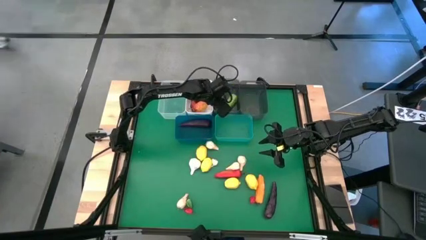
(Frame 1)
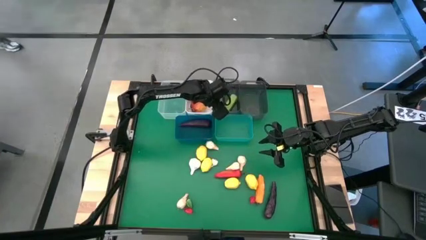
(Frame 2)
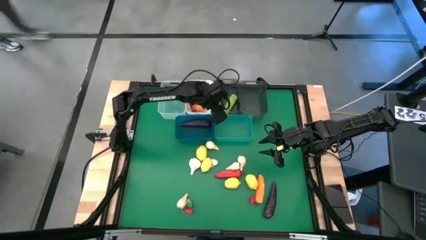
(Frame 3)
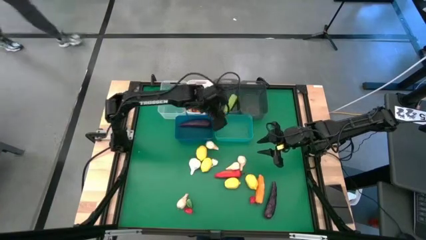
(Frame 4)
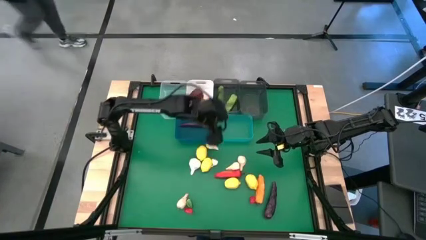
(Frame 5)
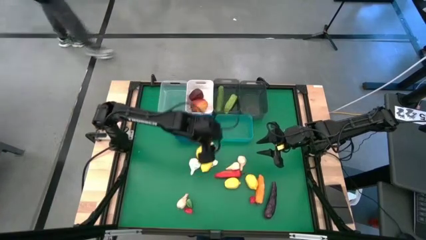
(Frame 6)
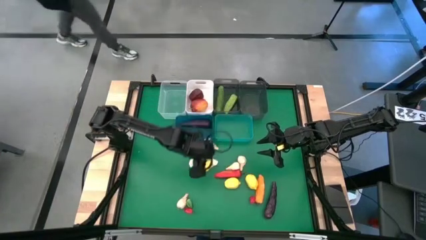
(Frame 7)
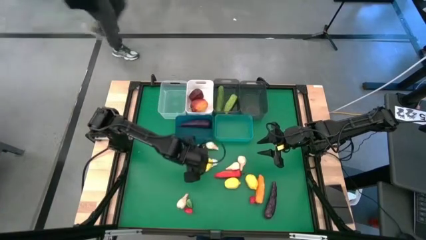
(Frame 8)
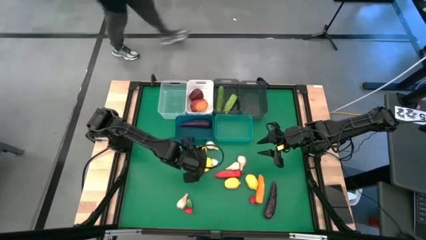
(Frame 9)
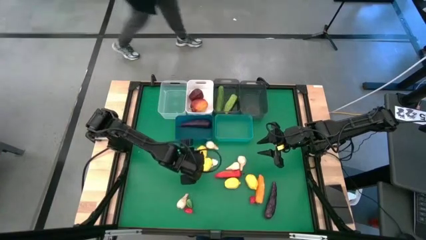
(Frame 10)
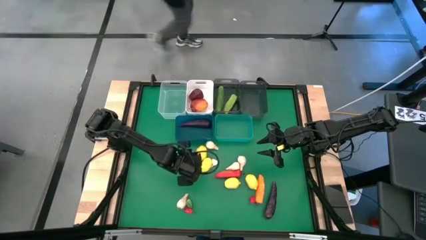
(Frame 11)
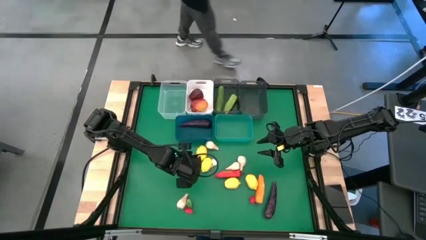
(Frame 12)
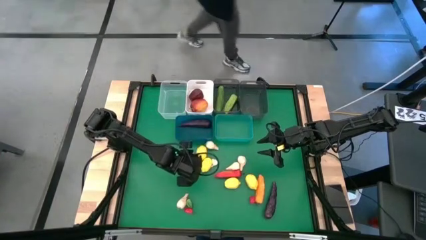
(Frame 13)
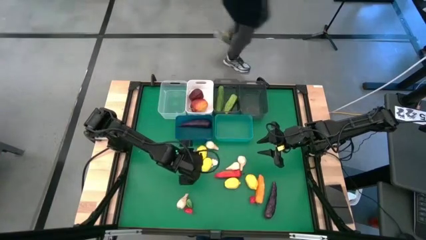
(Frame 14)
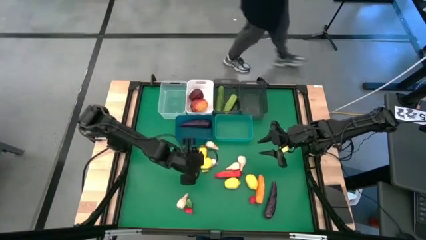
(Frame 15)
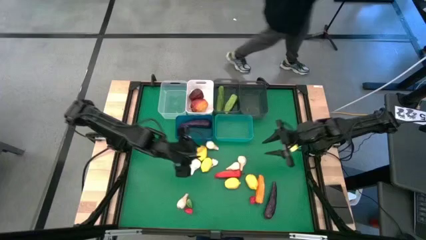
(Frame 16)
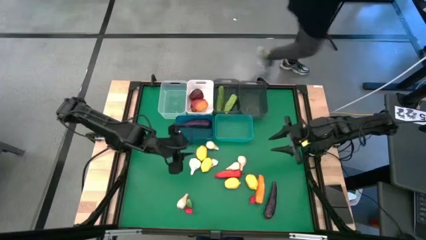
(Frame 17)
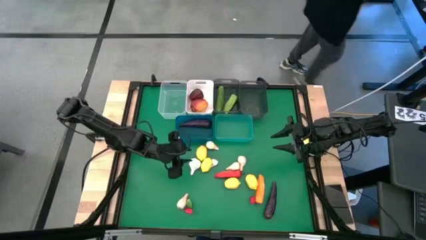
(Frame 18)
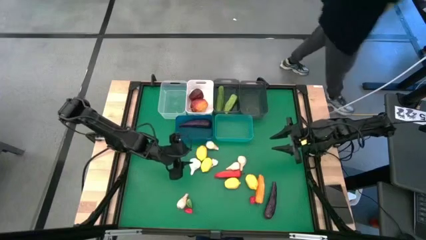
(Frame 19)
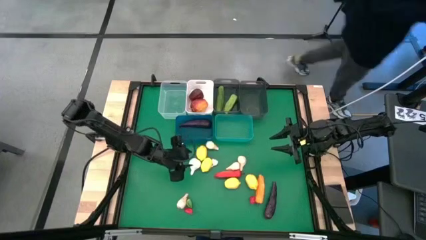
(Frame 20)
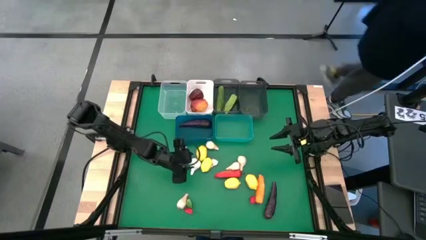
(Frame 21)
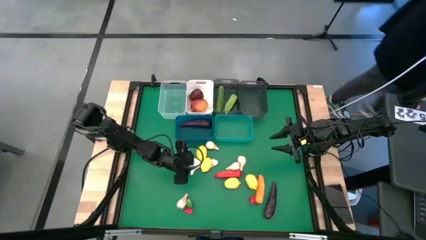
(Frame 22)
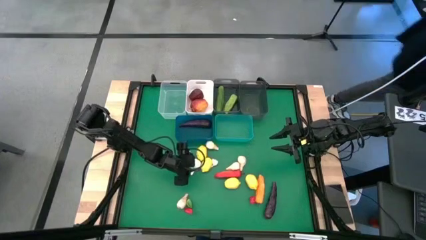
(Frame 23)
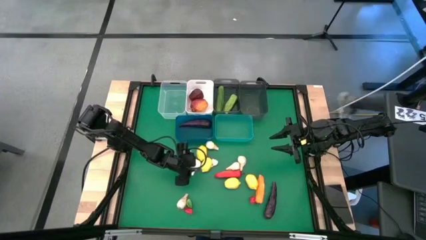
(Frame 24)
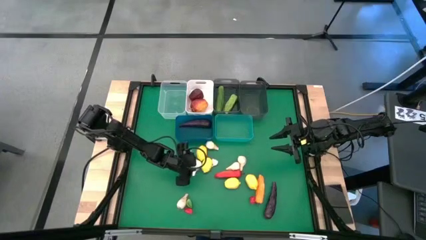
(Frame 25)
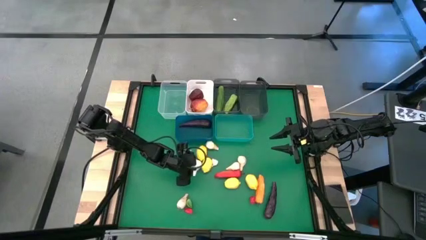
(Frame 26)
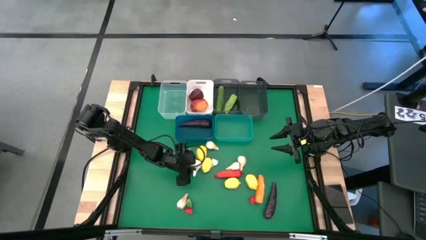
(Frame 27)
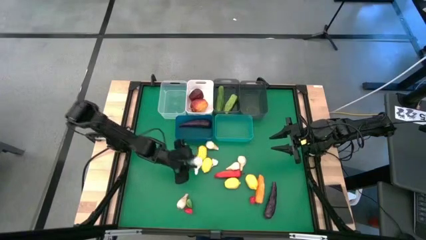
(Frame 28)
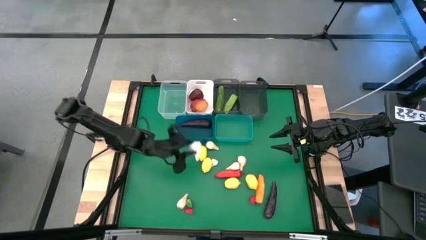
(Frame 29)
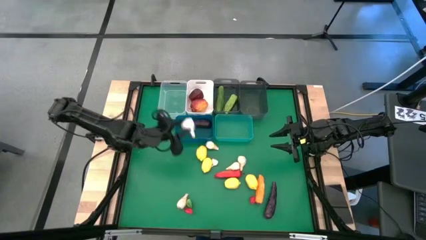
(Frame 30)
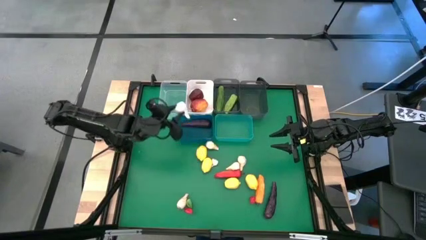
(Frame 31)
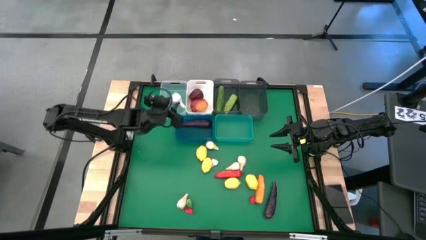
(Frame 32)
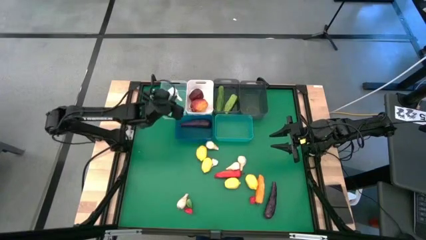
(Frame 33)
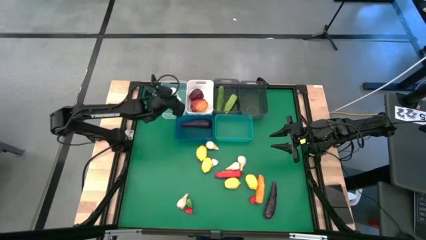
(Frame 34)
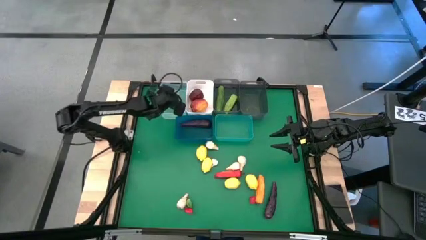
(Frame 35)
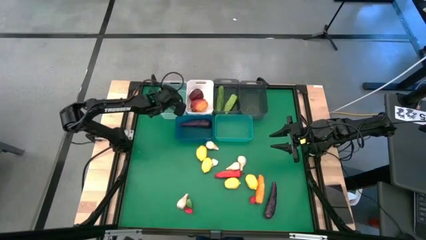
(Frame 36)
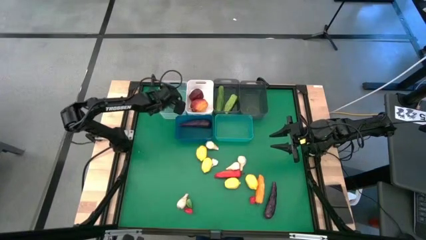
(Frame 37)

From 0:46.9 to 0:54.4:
Task: Sort produce into baskets
Put the garlic into the transparent bin

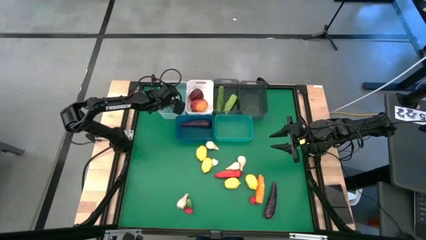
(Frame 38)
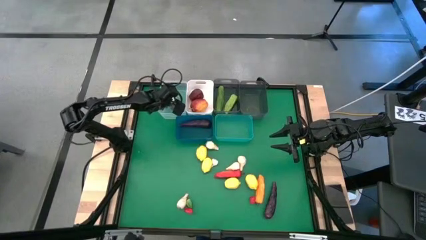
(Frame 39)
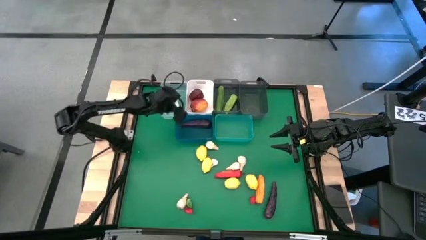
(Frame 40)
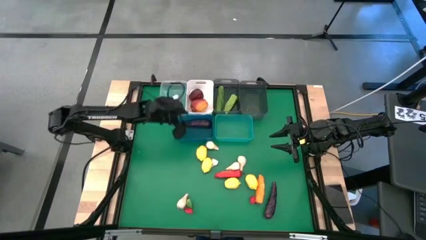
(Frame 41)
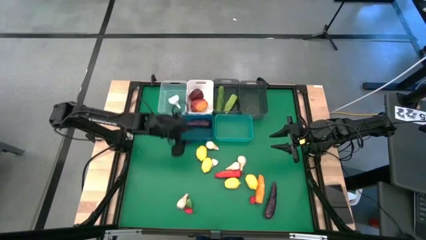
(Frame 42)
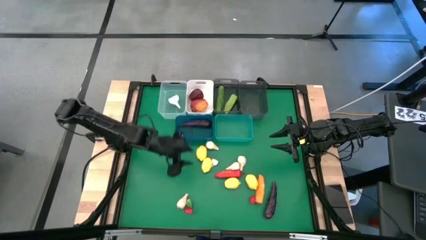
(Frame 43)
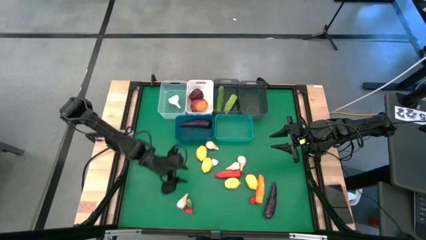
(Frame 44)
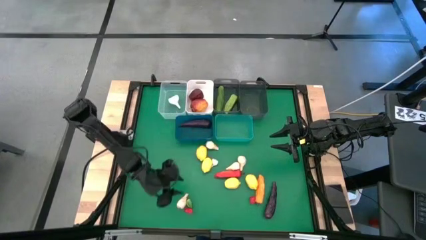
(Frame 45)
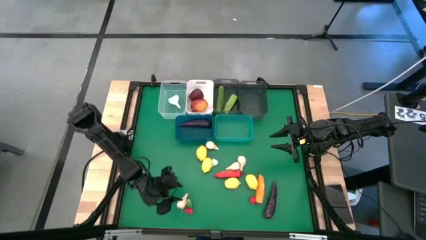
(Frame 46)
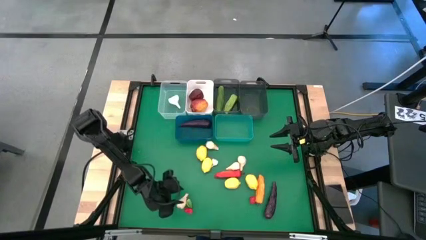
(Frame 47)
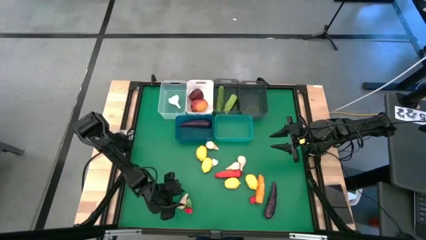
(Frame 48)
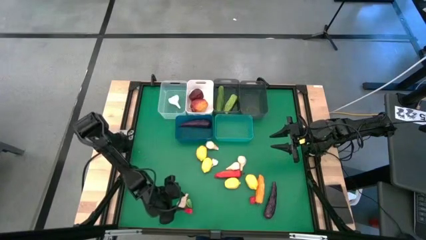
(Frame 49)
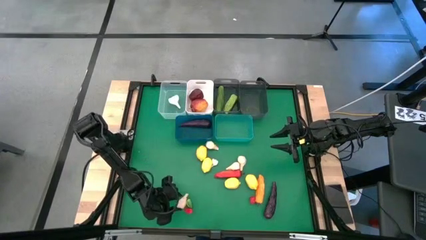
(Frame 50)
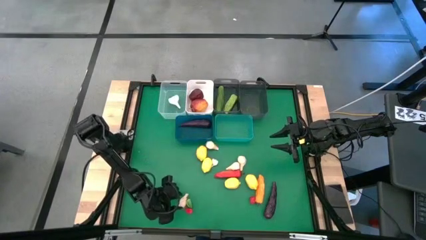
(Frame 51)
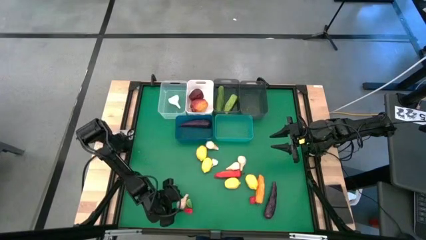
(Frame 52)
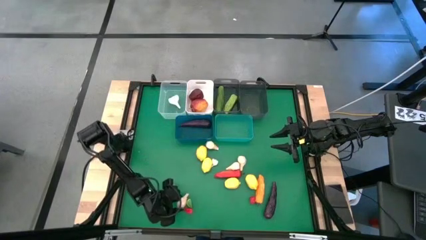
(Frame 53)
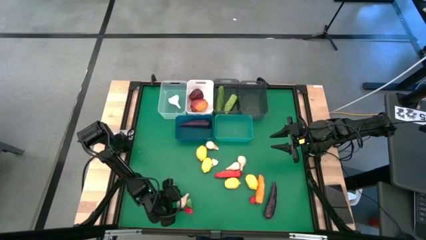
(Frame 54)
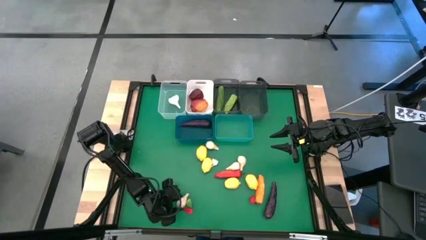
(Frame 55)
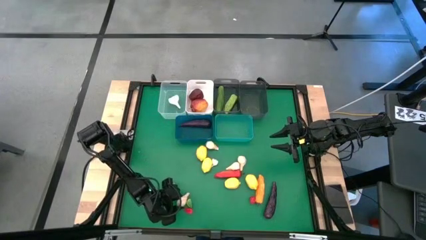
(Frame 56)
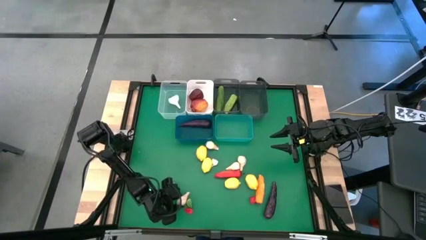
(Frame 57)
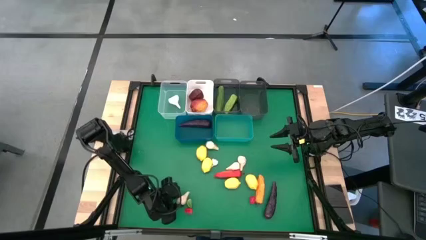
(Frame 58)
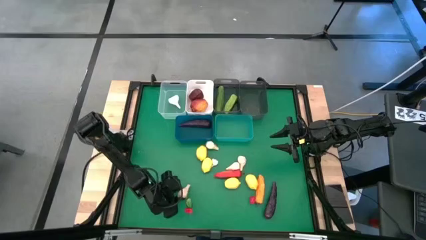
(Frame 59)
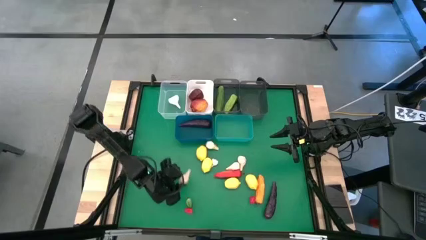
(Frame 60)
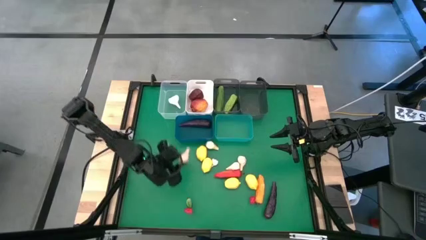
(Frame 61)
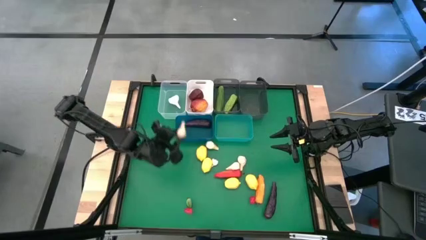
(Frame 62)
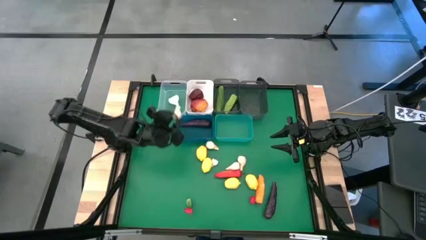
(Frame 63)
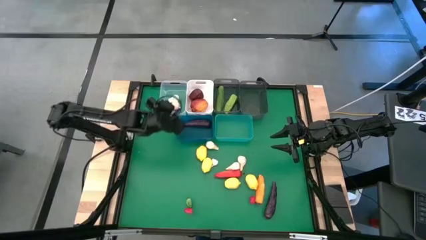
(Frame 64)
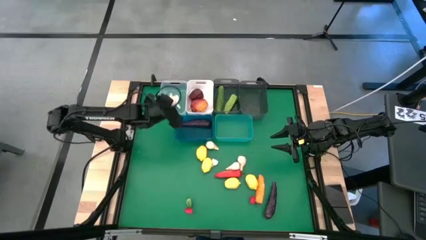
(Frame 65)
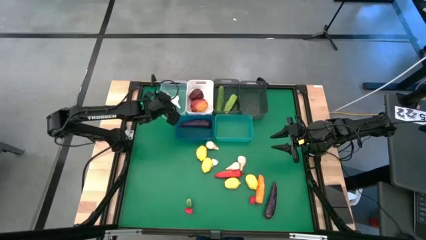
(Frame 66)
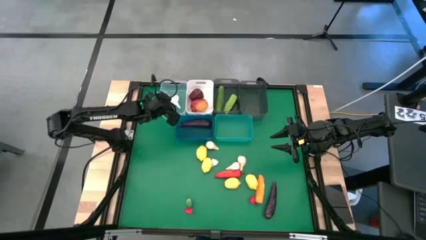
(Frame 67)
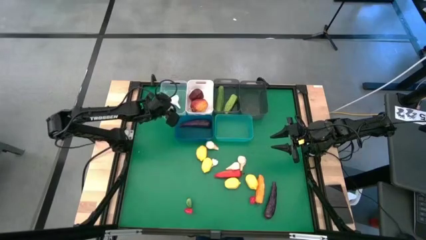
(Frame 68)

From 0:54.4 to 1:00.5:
Put the garlic into the transparent bin
